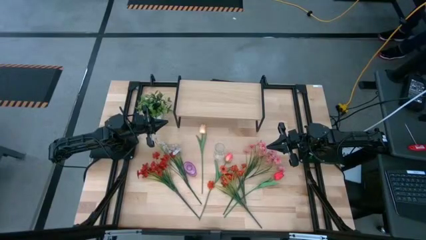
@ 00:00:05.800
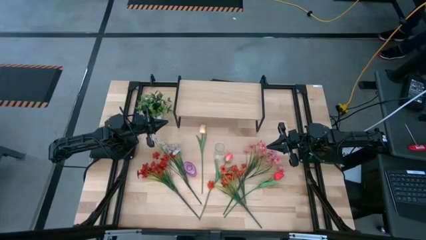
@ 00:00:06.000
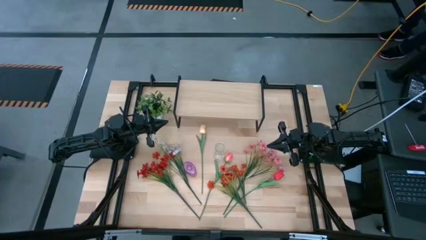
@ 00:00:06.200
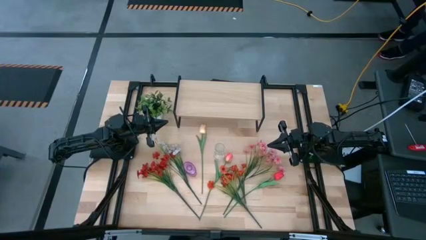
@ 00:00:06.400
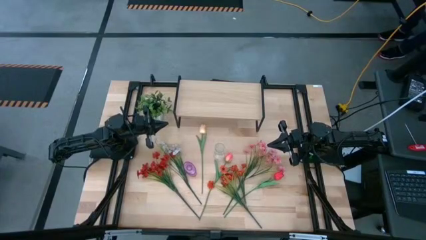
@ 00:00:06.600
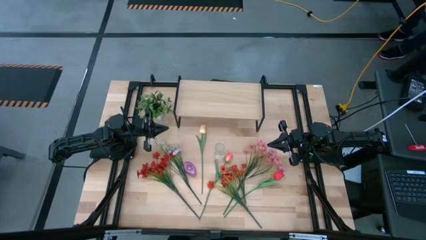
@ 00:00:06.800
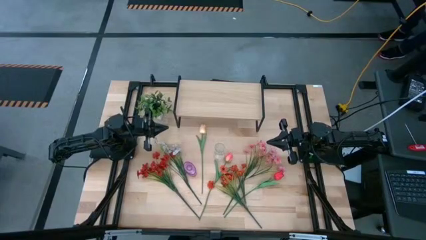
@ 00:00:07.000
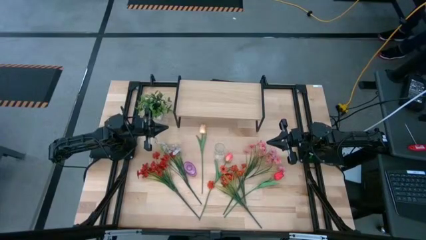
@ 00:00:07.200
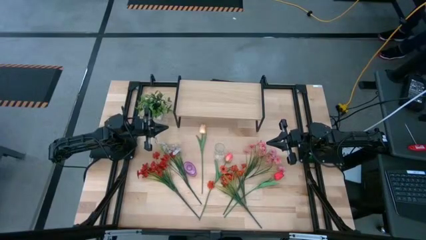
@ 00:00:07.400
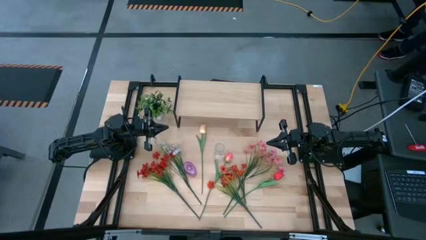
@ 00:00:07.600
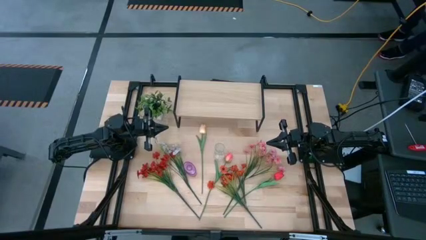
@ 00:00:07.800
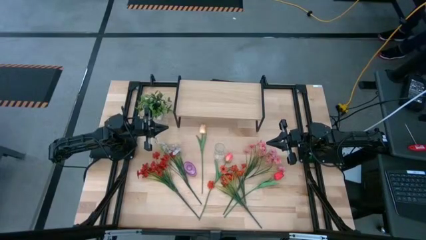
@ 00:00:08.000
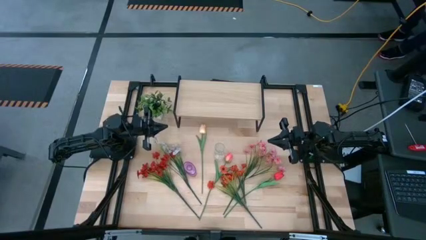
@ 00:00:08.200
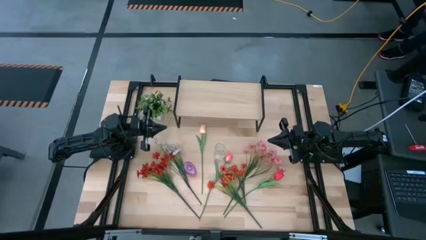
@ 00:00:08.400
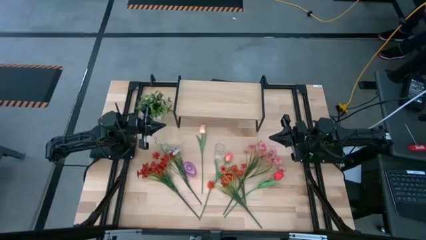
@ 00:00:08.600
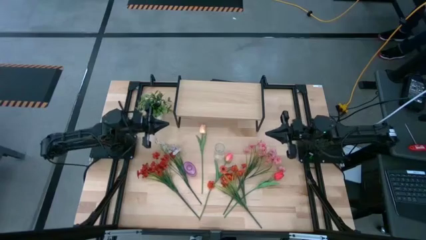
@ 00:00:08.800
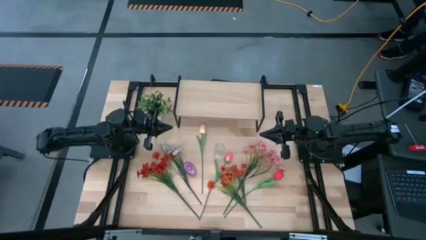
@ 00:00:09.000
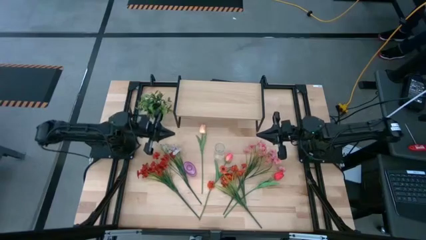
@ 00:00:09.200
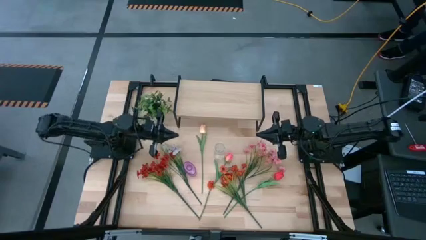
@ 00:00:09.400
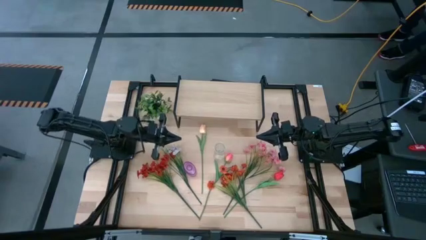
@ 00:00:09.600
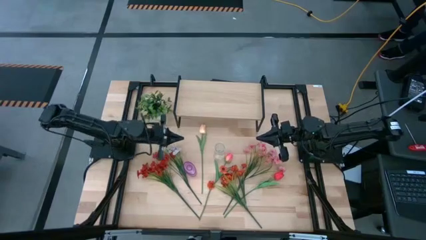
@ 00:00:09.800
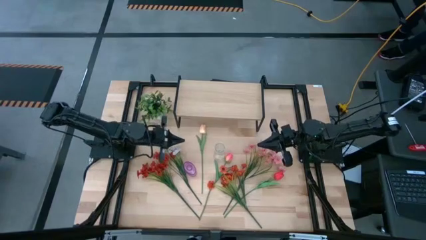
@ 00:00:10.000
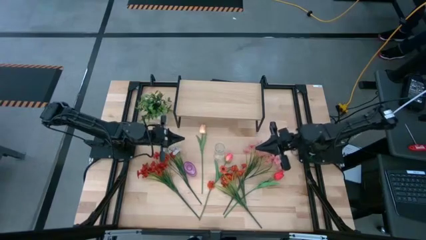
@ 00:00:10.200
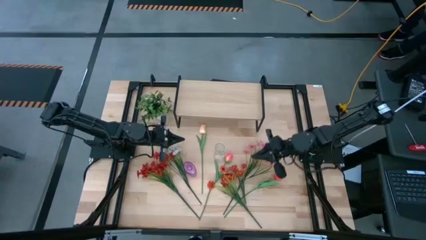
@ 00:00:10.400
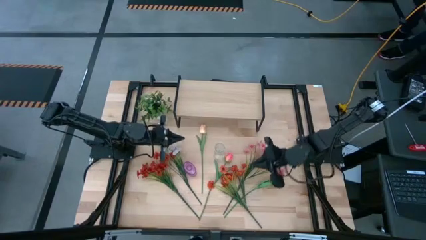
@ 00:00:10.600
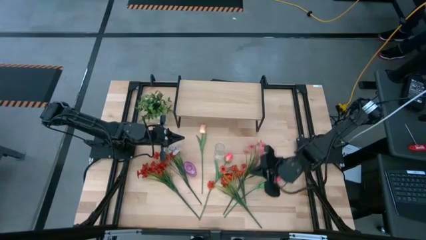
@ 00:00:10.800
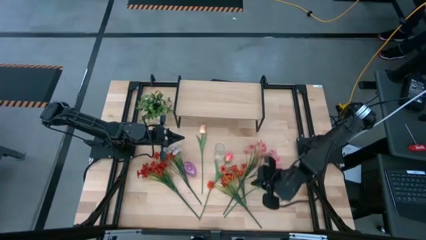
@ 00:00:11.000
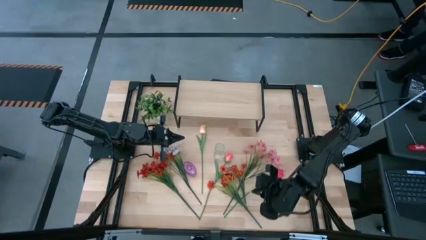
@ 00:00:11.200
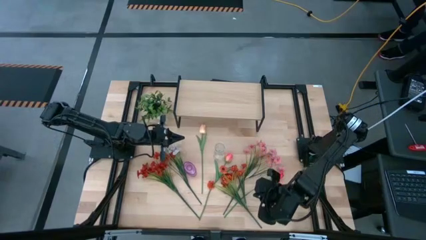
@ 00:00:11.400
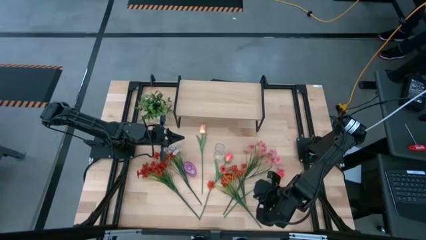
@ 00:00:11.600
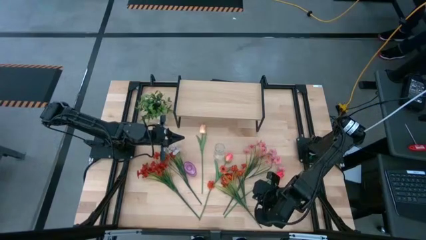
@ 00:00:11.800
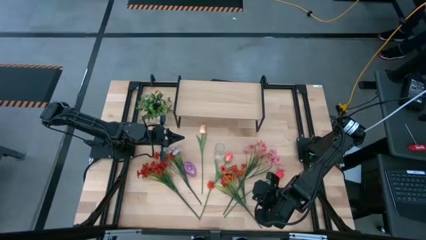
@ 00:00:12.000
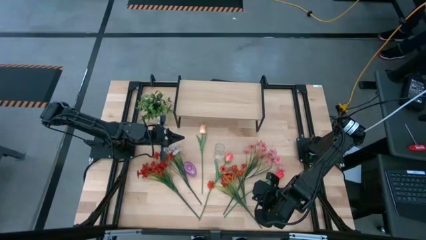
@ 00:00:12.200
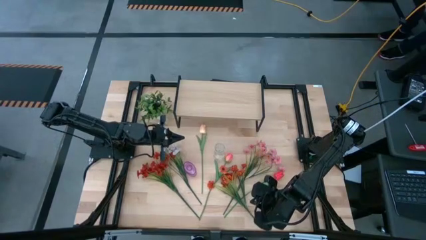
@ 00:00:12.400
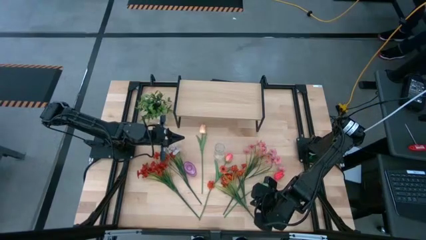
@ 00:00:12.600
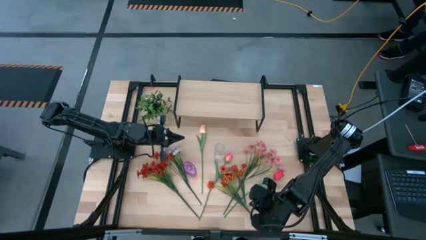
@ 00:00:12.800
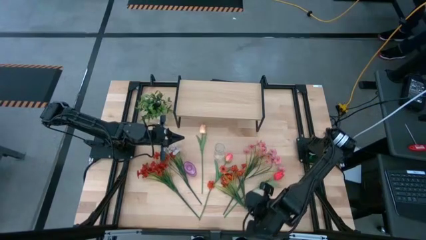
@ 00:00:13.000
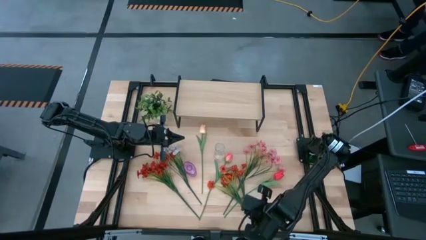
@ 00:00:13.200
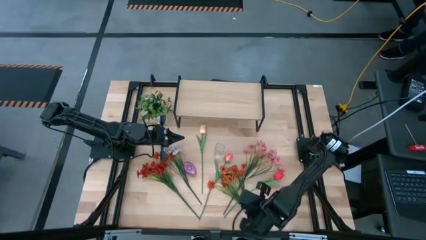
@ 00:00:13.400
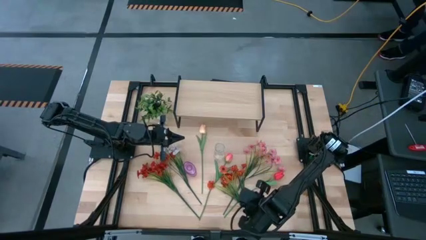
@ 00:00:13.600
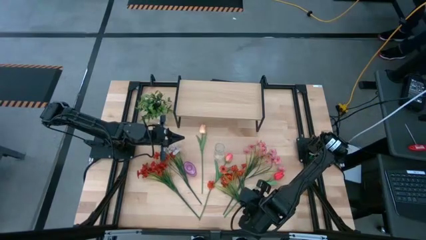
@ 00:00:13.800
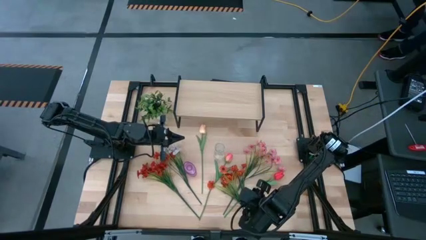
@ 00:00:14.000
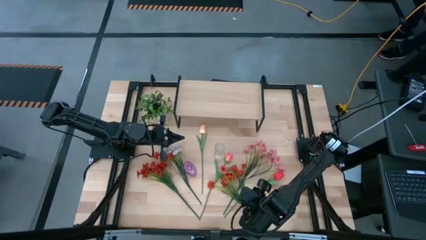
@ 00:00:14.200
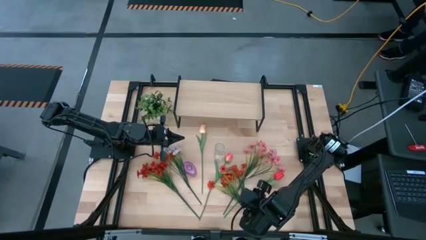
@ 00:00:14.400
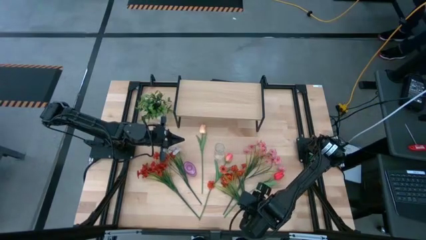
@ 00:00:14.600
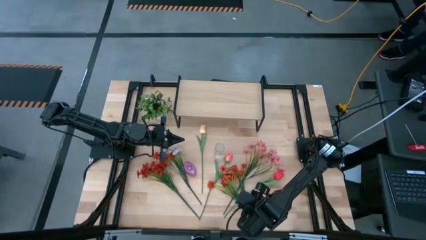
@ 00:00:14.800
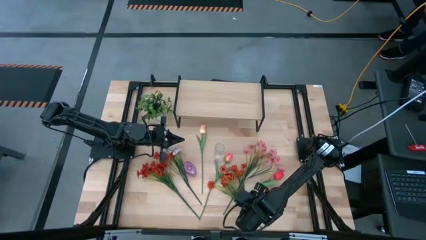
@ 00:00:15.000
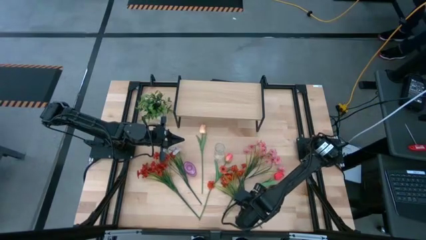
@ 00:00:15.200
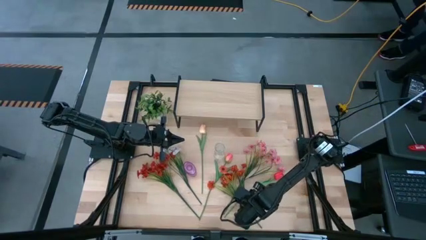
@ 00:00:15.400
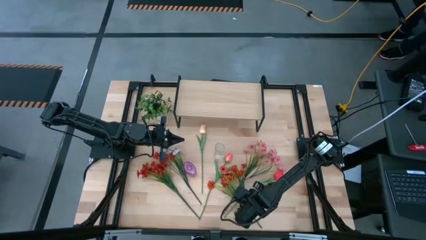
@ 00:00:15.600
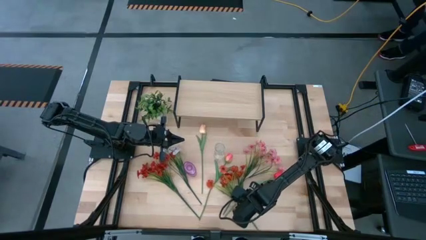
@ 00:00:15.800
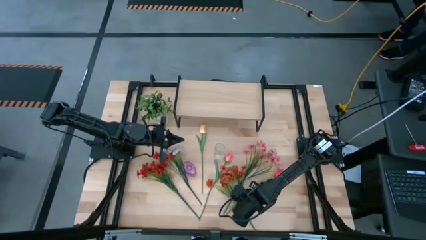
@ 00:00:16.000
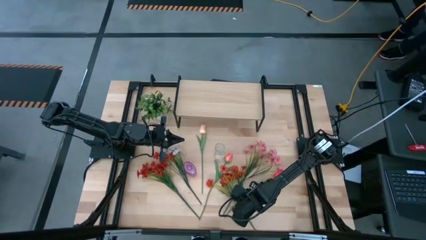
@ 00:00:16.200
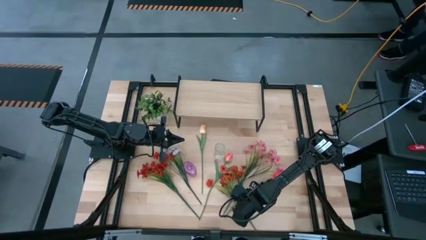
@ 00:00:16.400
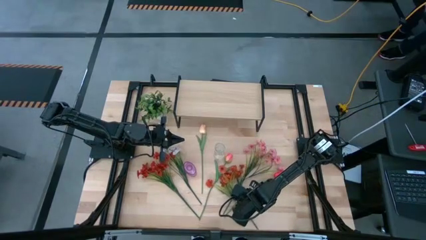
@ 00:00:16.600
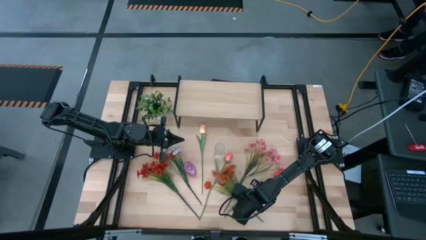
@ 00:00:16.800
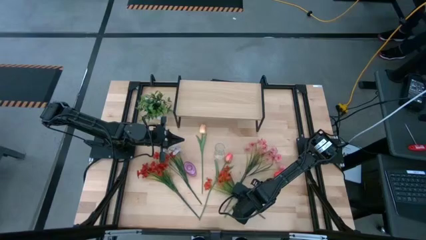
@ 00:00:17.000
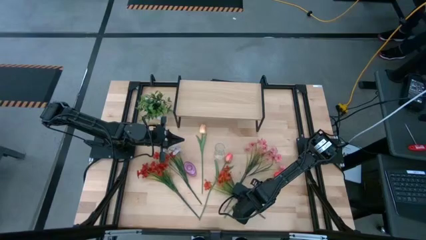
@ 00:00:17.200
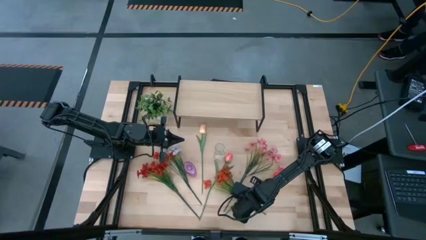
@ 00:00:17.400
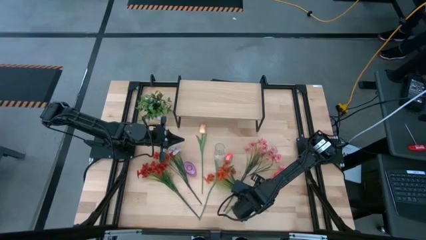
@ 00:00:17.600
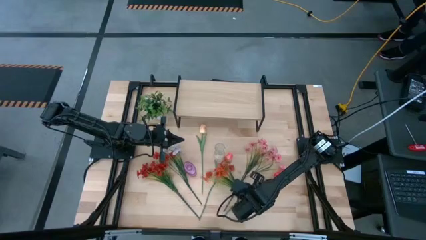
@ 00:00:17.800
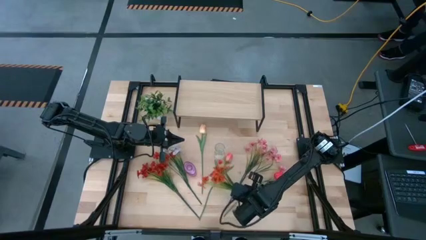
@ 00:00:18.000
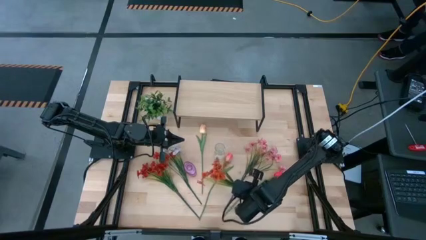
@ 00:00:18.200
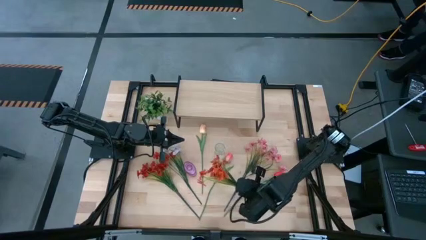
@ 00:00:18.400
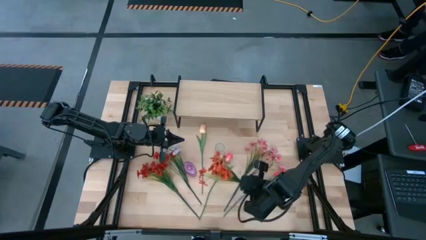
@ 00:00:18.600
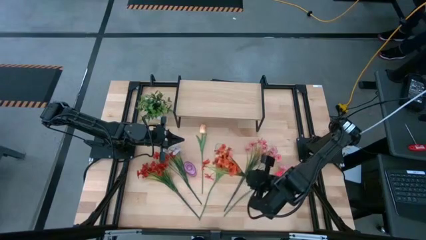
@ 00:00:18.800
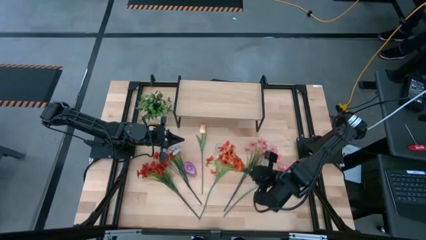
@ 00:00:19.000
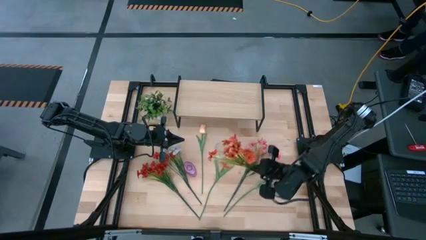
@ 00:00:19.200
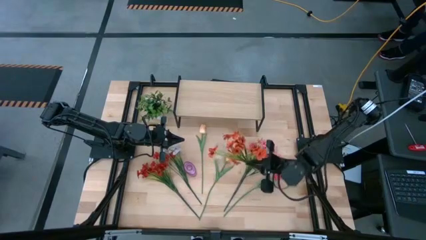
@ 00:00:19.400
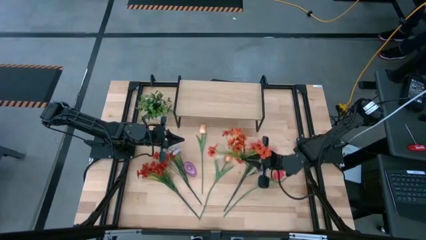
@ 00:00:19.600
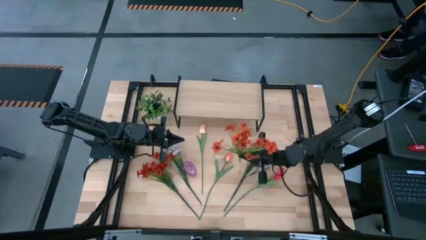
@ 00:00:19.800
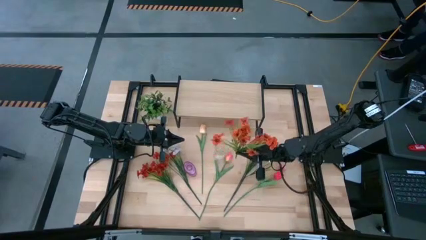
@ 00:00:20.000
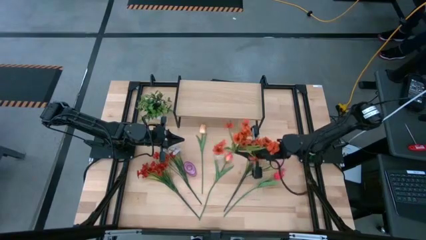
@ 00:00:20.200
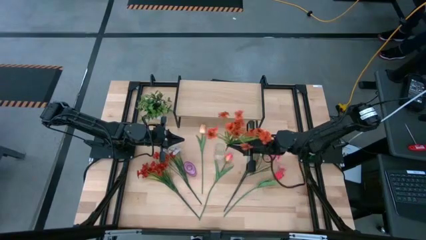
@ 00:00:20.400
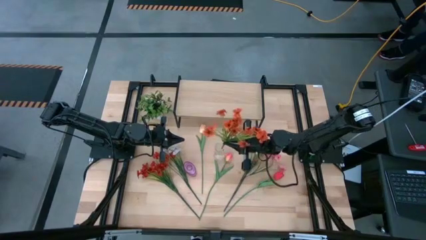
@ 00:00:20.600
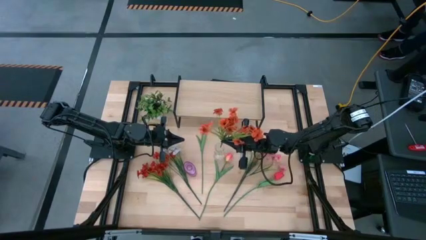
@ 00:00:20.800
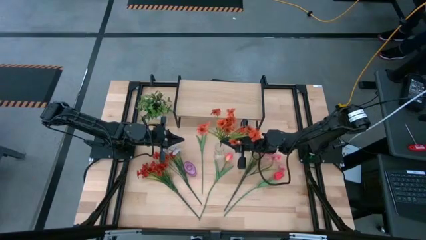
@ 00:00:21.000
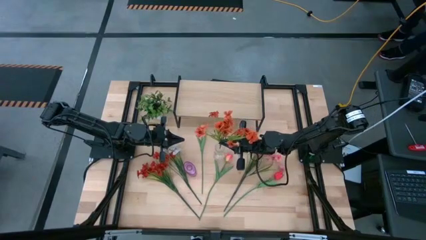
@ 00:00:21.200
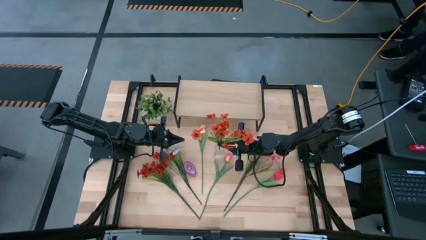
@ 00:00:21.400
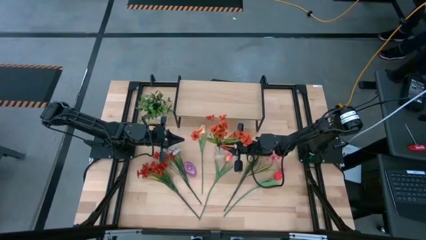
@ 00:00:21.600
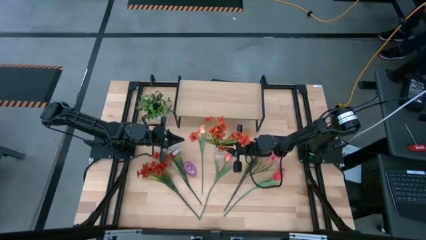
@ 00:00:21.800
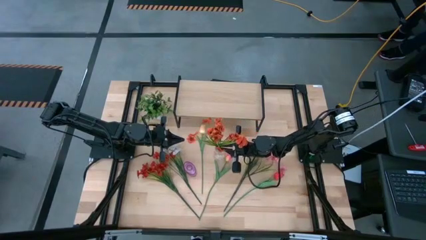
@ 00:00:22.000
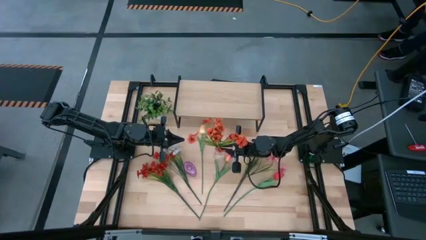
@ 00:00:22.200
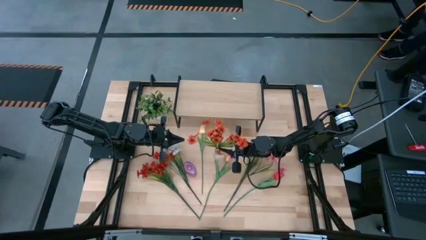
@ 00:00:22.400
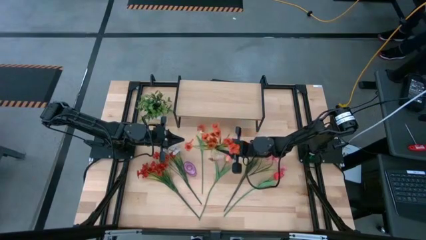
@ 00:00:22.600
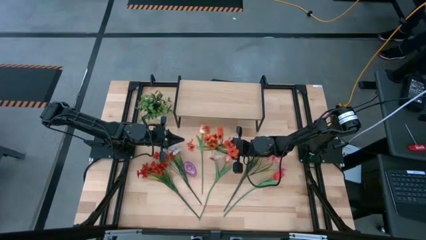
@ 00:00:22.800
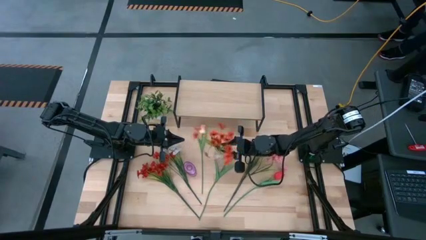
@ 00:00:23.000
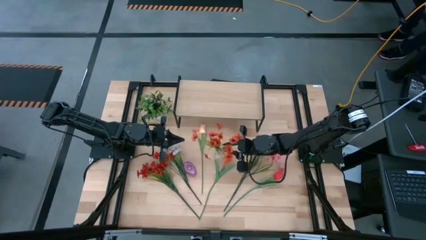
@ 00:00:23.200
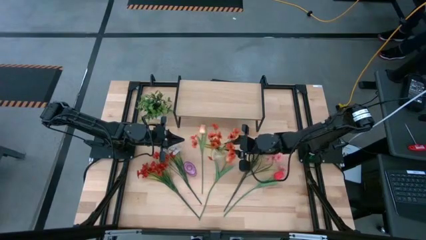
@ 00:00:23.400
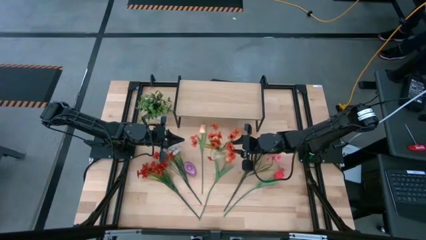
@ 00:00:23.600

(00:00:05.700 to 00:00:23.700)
Task: Pick and place flowers into a vace then onto a shelf
Put the right orange flowers into the transparent vase
